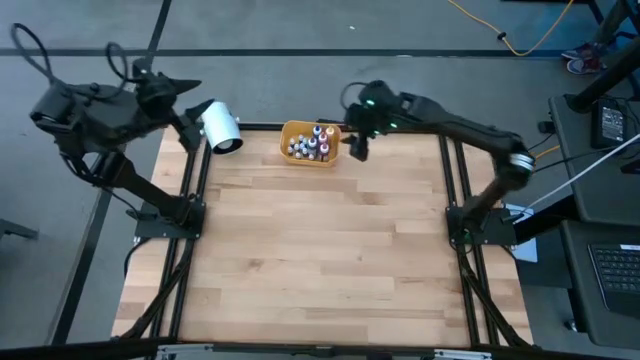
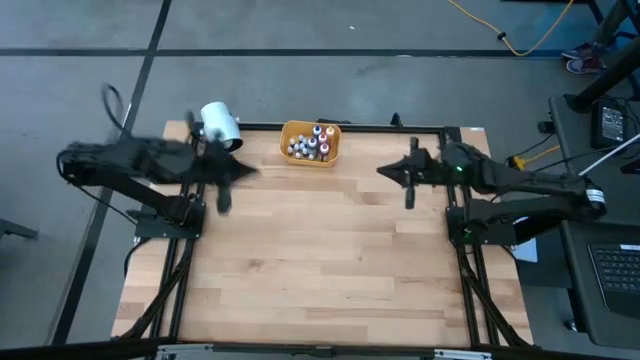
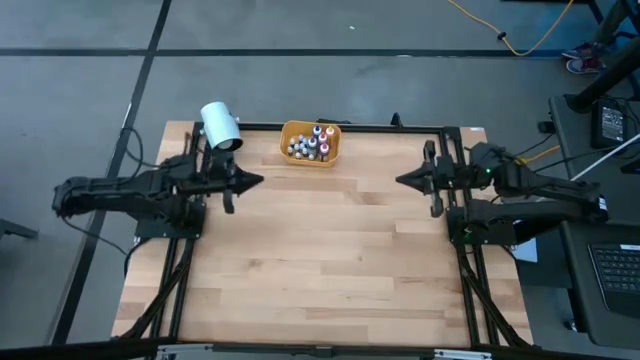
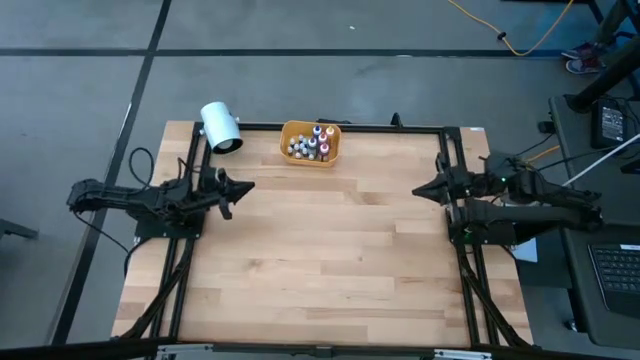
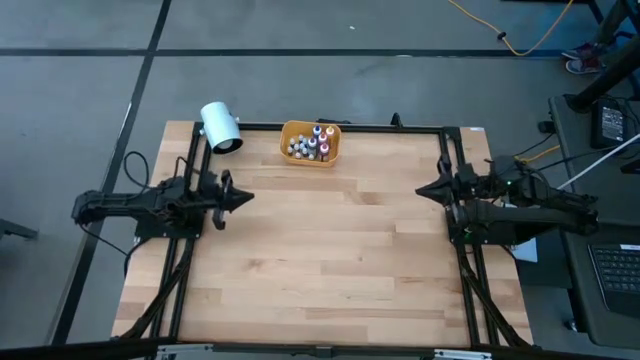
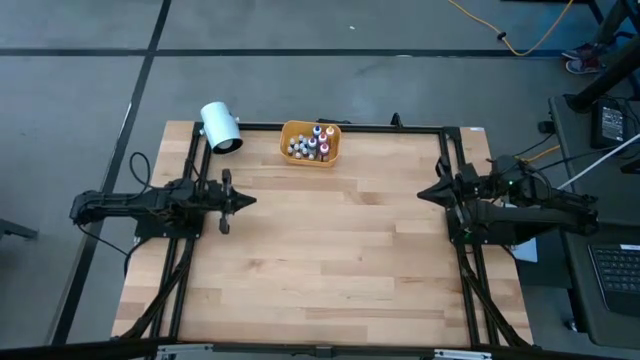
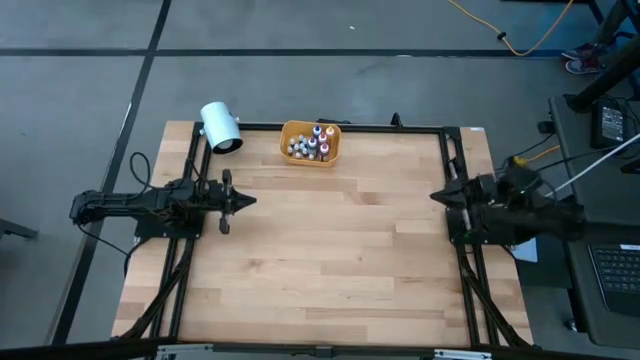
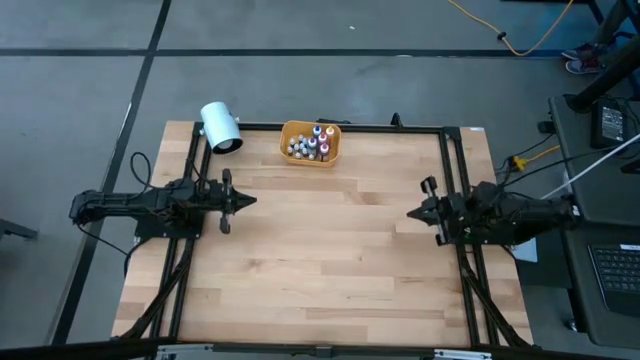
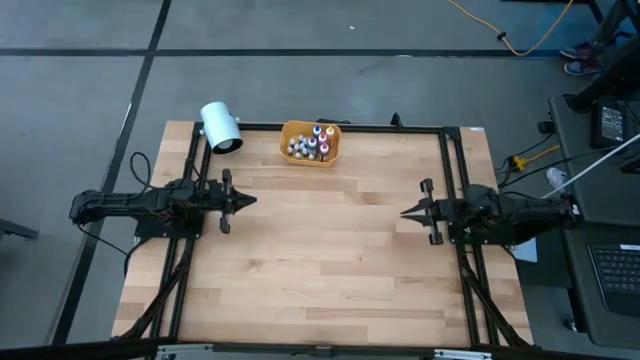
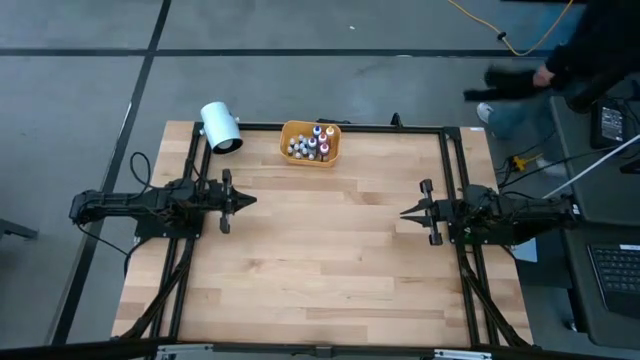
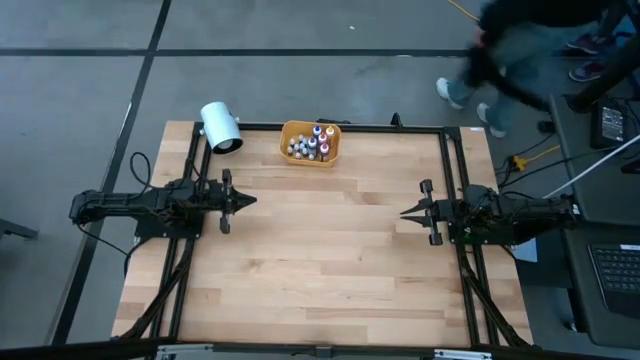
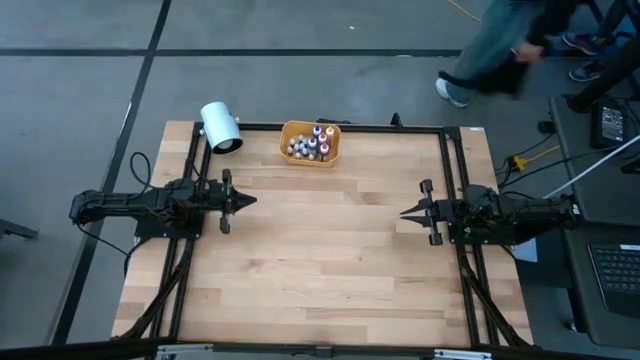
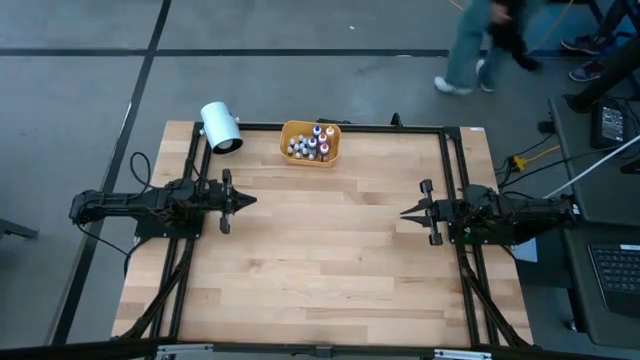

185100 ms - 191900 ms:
Task: Pick & Place food coloring
Return to Home Position

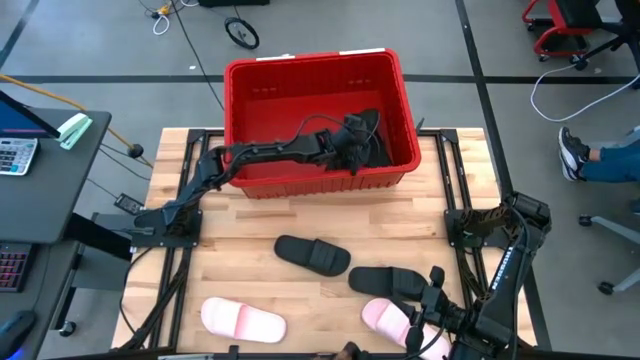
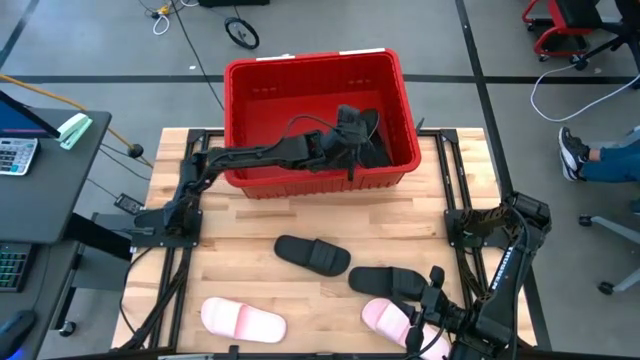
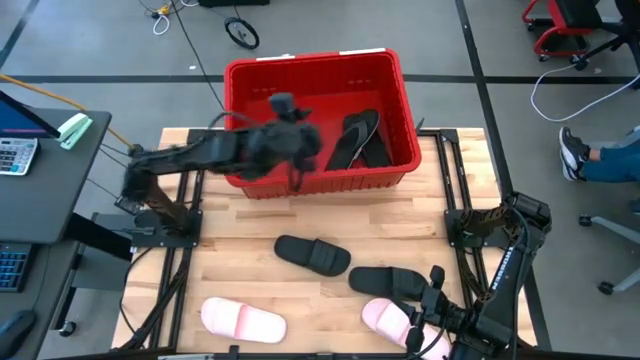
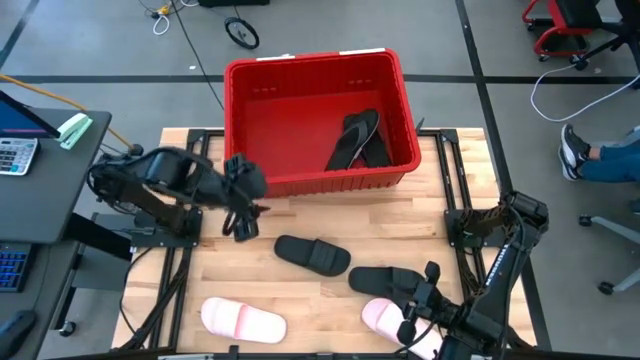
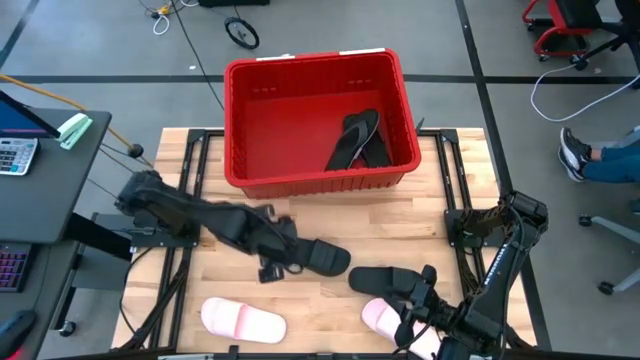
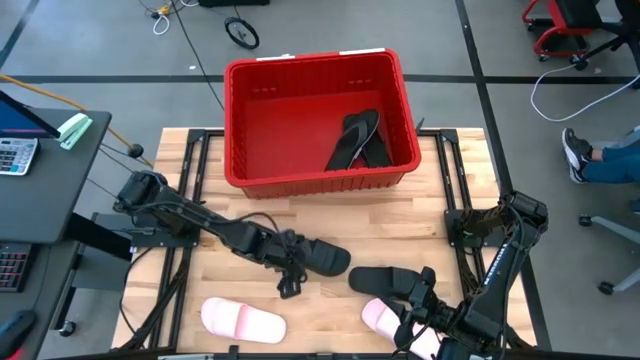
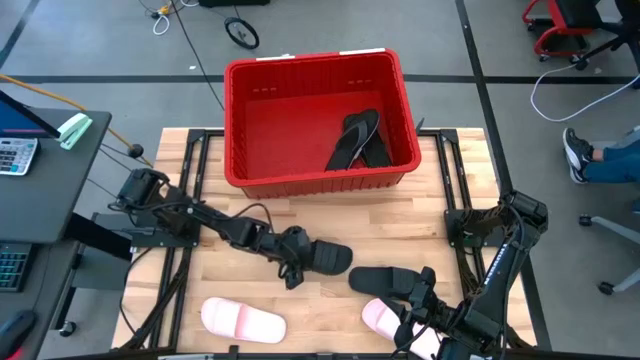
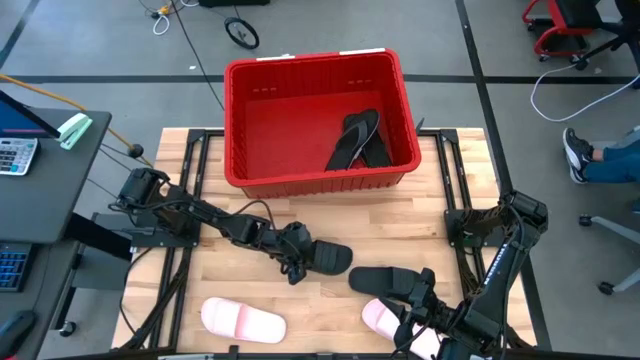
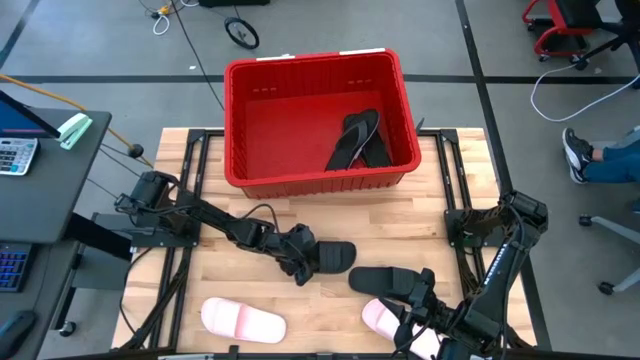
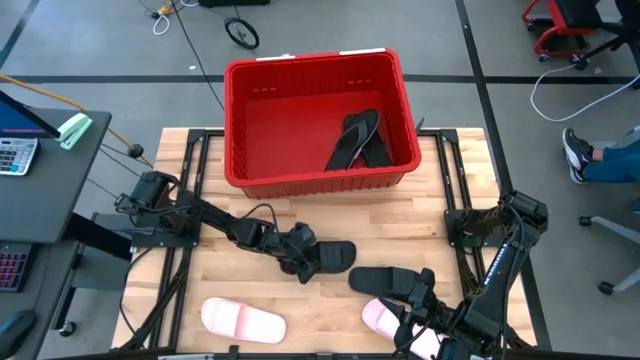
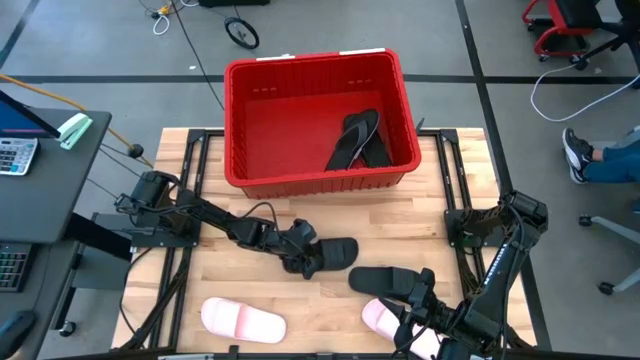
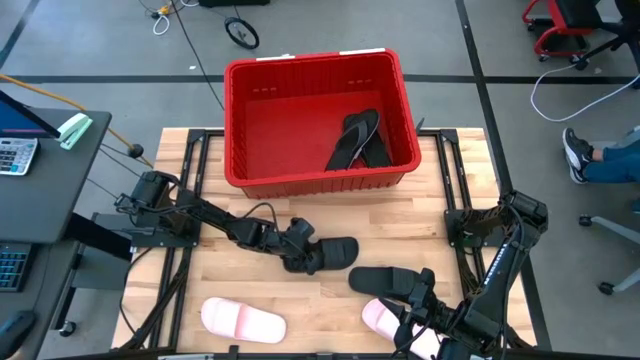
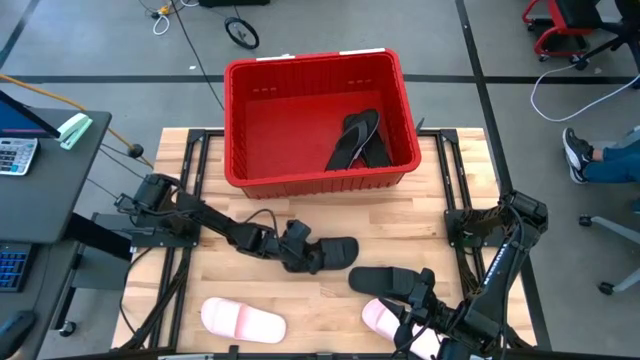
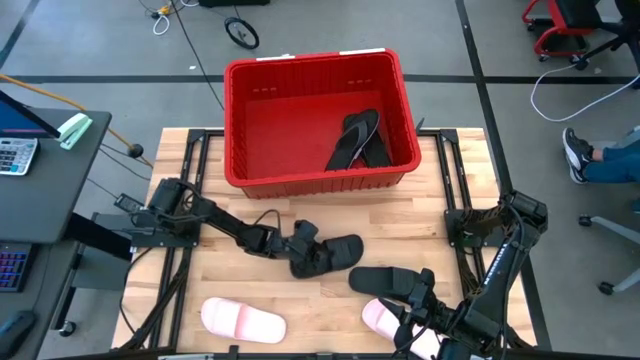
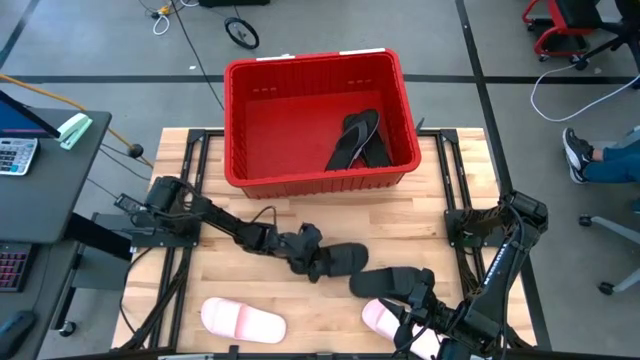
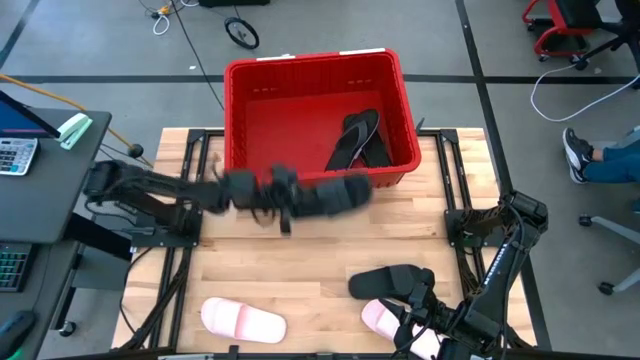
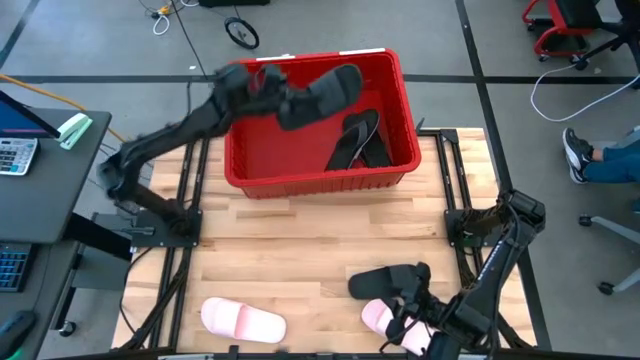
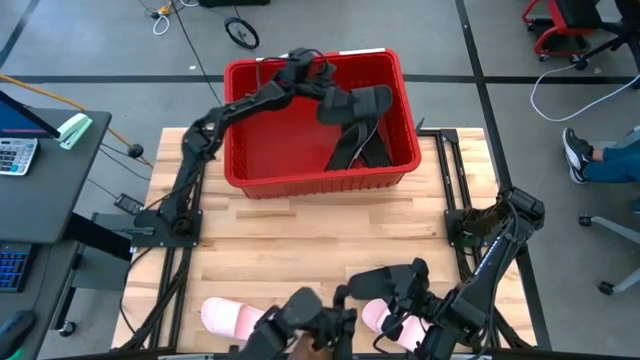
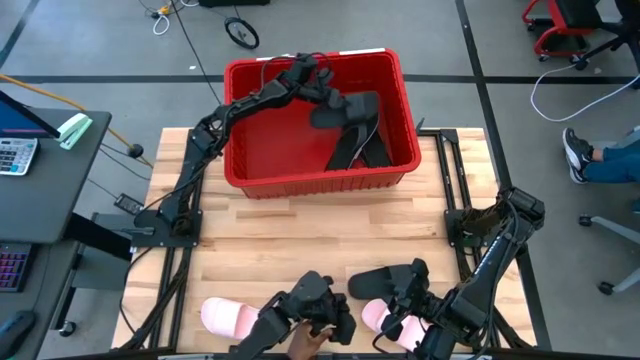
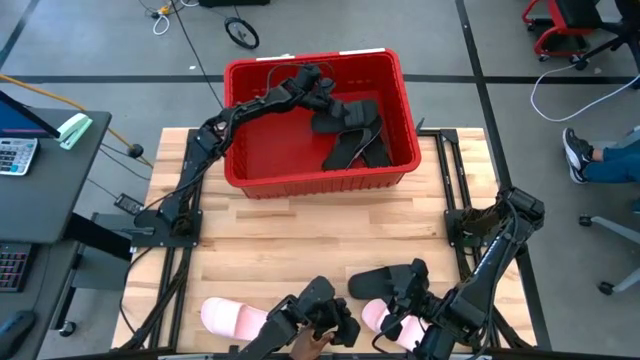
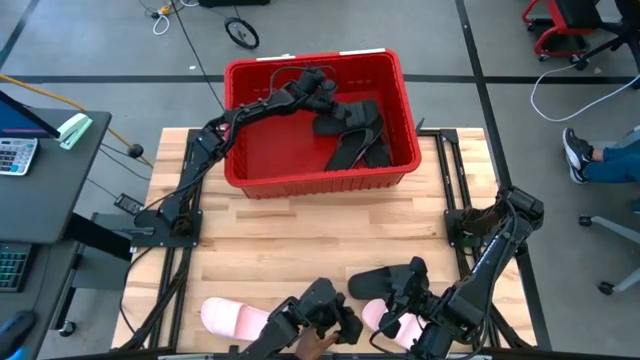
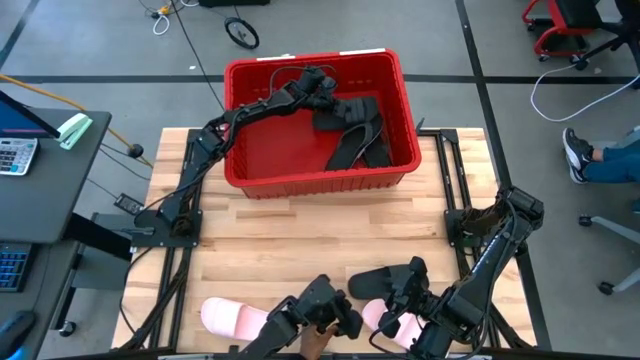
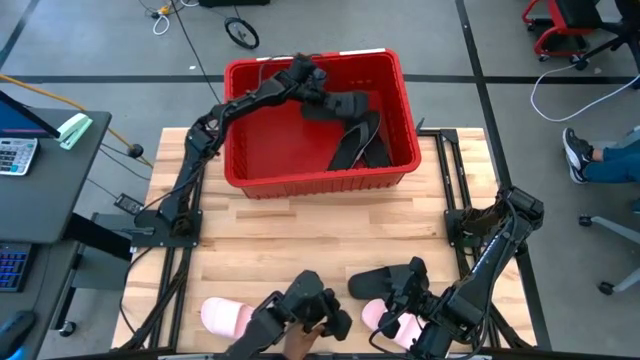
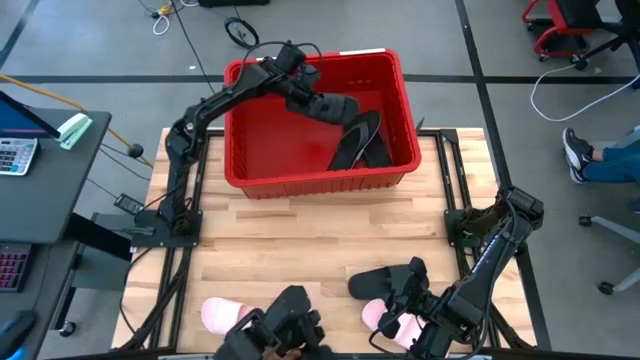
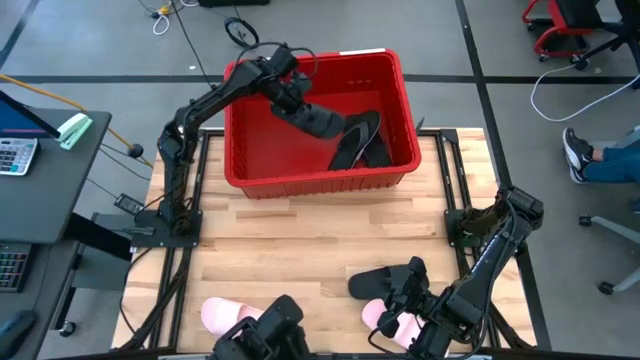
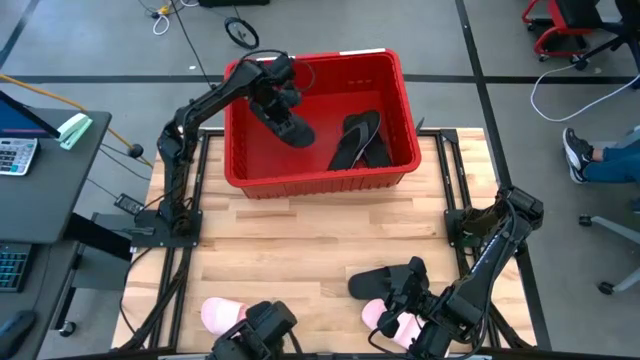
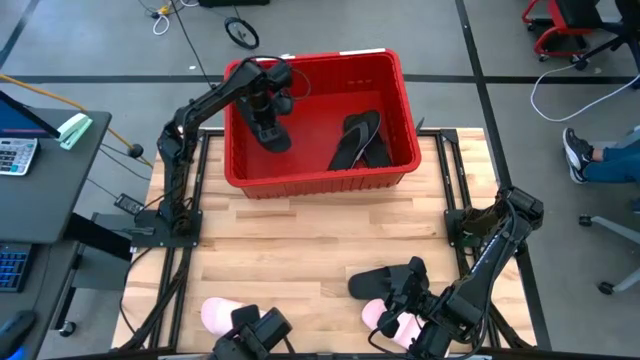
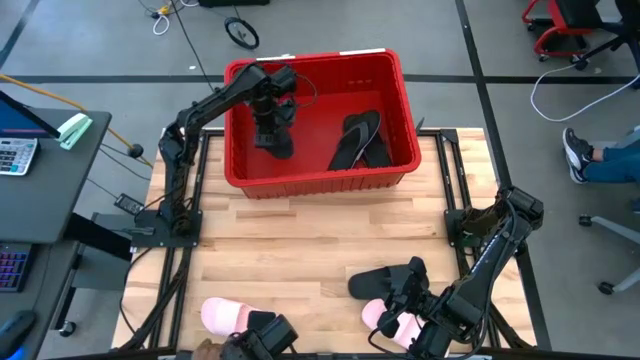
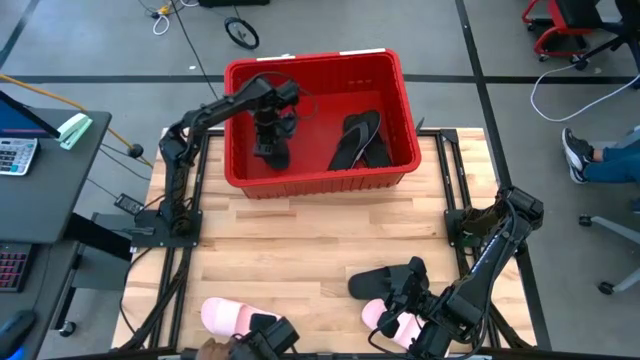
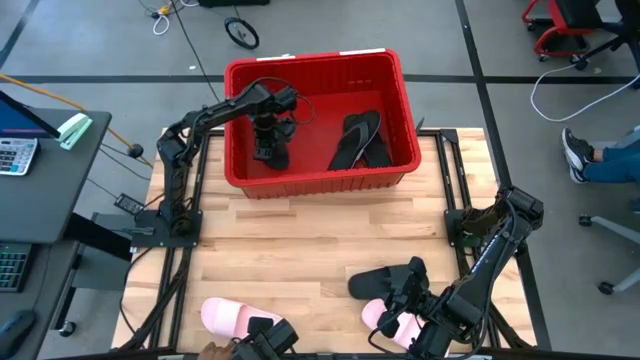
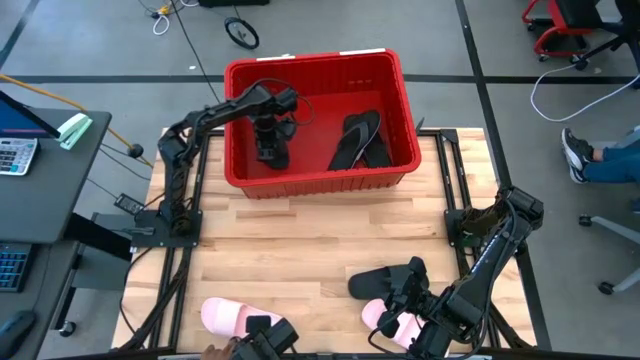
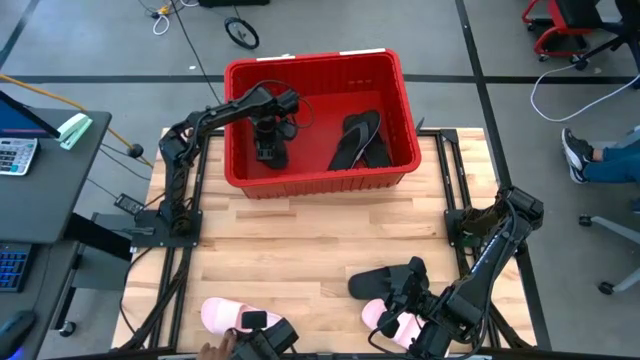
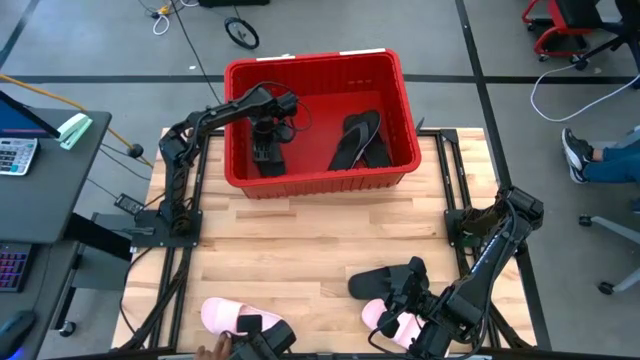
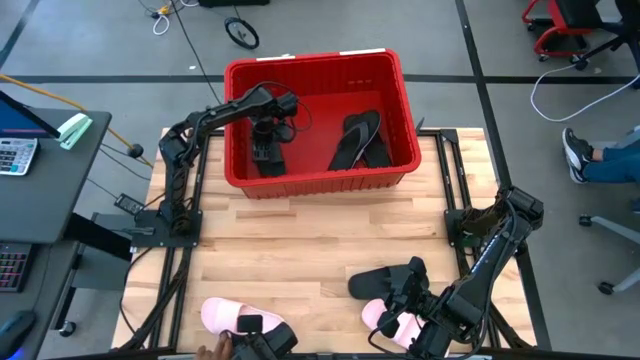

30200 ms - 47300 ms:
Task: Pick and place slides into bin
Put the left black slide into the red container
